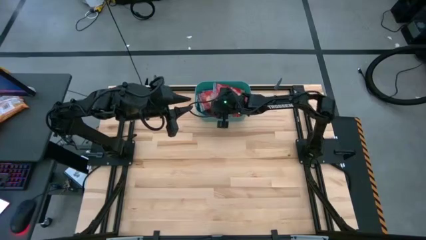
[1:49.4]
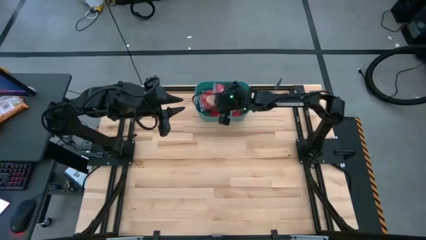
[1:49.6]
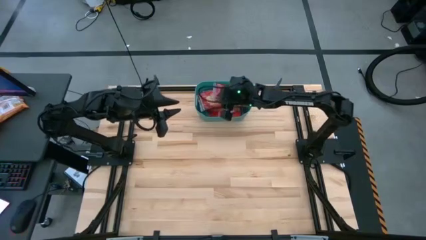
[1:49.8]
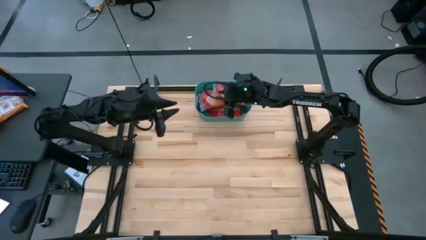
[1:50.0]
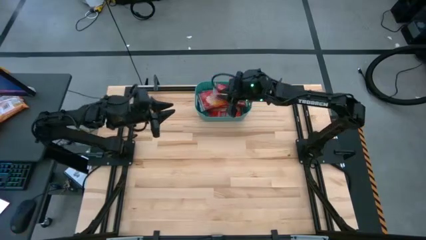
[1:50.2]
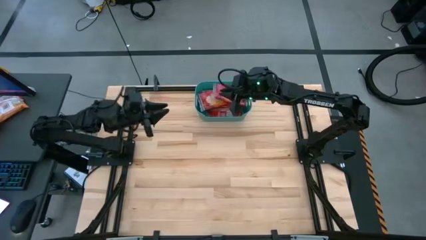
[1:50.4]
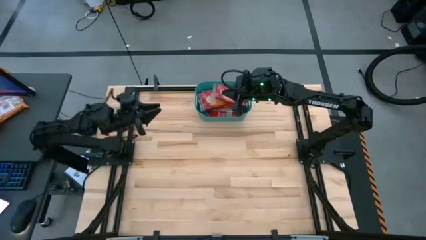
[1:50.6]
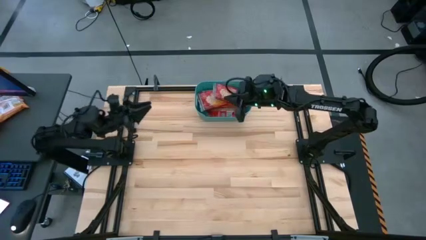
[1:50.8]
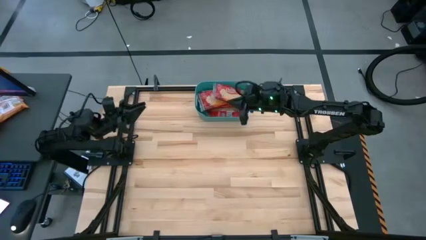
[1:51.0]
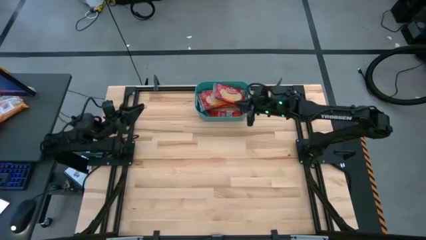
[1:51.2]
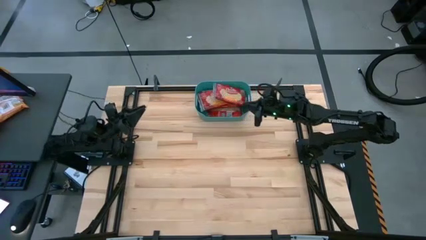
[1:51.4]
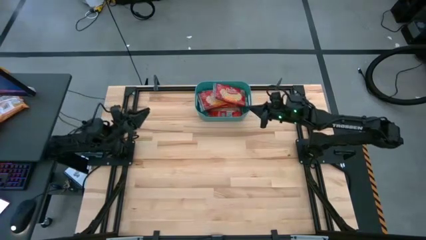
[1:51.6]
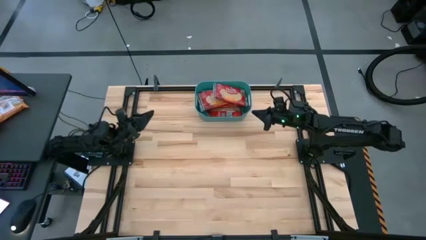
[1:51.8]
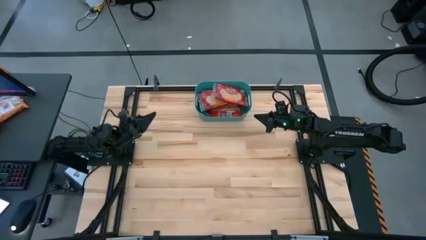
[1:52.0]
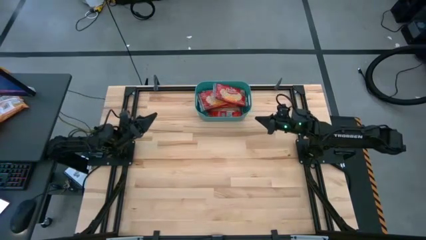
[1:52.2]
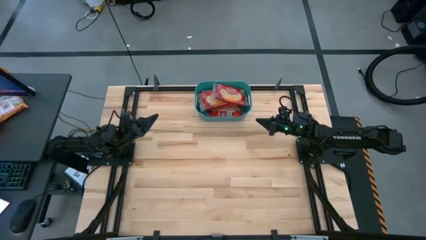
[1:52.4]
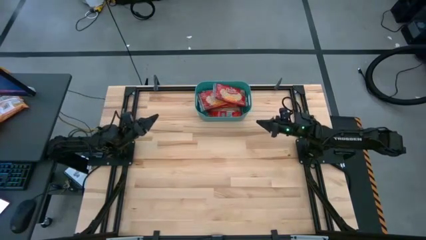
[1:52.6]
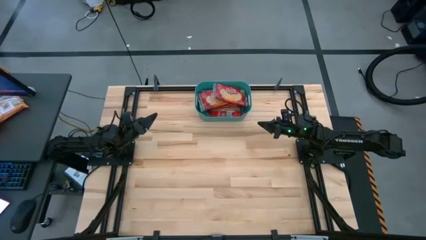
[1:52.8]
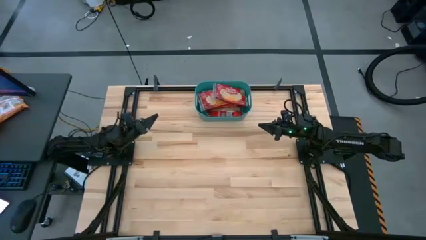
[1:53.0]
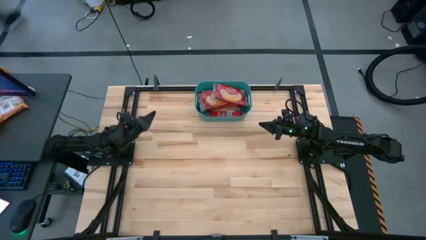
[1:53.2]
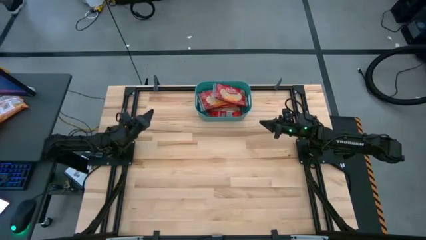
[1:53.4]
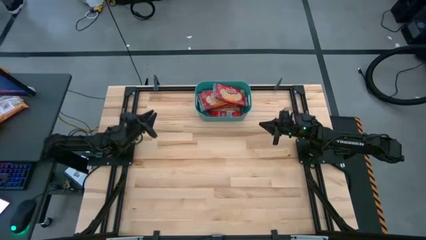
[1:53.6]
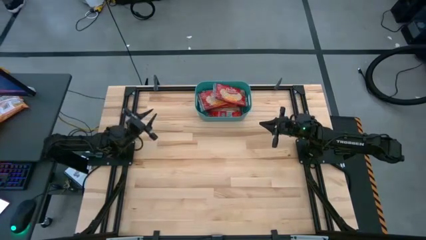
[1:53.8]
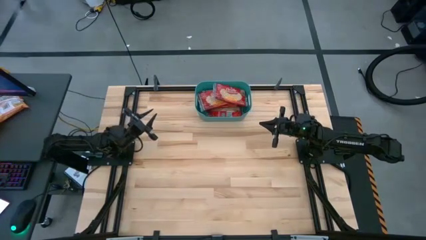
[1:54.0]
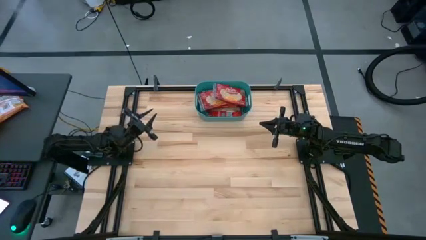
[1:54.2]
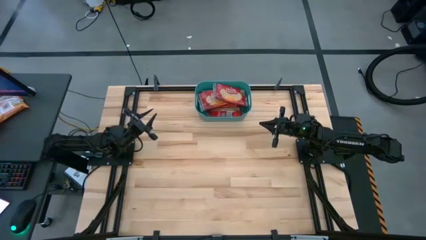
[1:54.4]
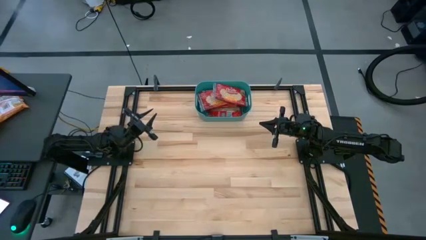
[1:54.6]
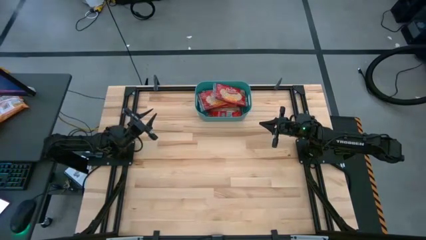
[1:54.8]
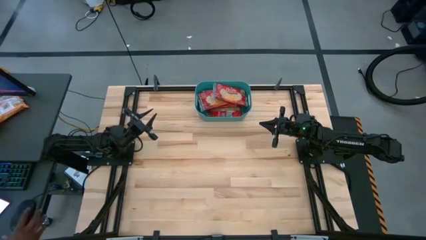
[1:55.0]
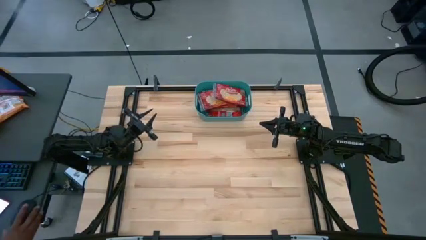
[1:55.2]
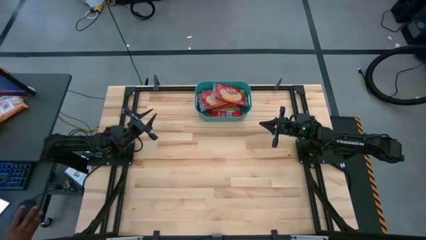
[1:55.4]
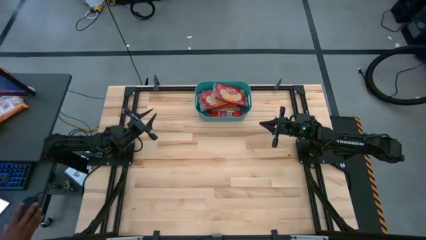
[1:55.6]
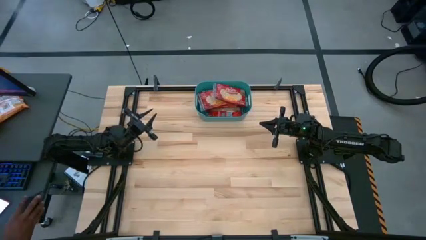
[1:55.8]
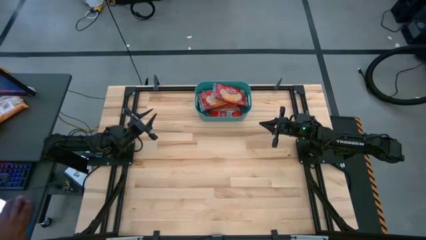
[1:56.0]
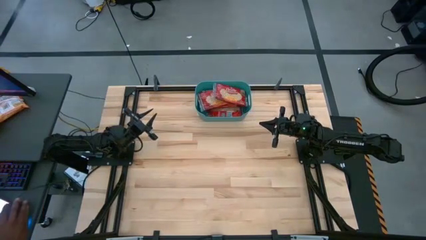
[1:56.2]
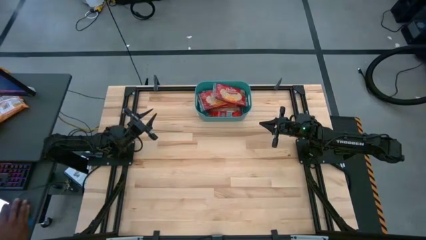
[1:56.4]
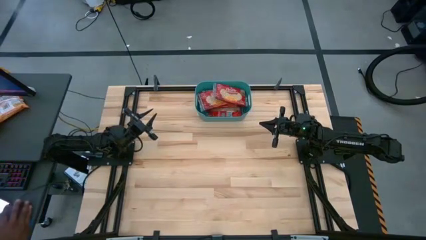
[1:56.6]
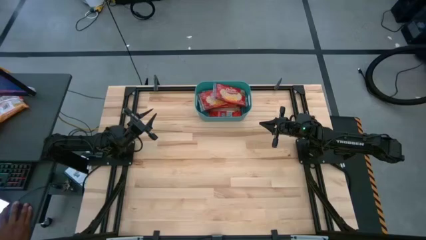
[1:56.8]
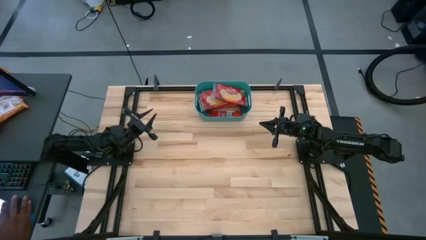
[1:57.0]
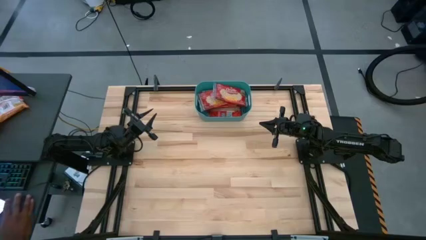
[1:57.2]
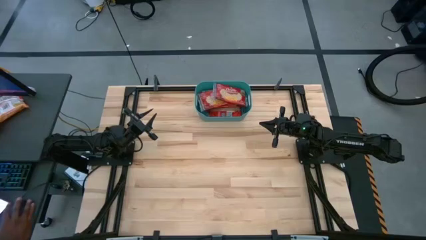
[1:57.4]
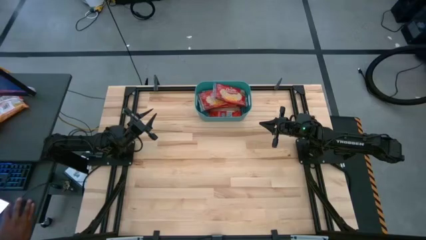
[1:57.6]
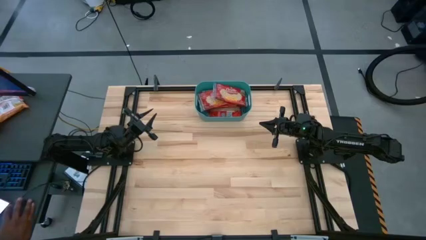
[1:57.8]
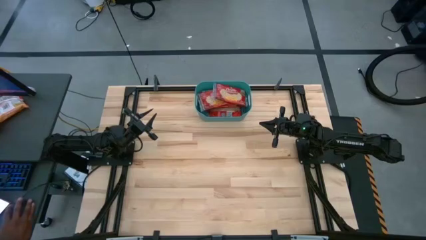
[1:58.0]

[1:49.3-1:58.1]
Task: Sort popcorn bags into baskets
Return to Home Position

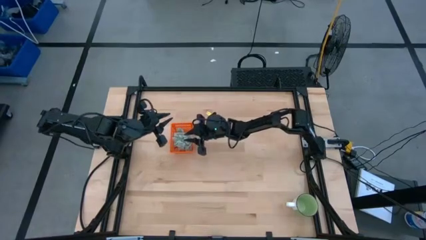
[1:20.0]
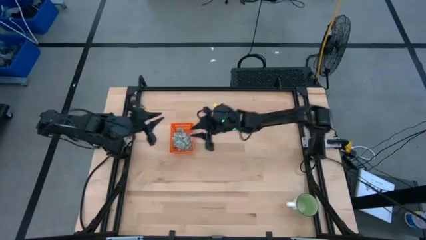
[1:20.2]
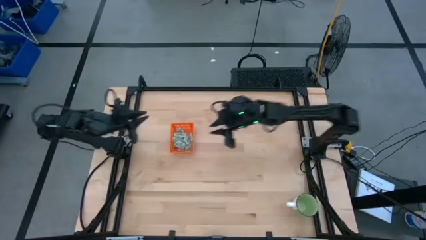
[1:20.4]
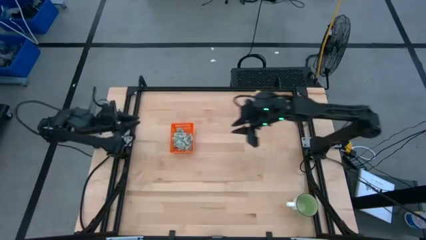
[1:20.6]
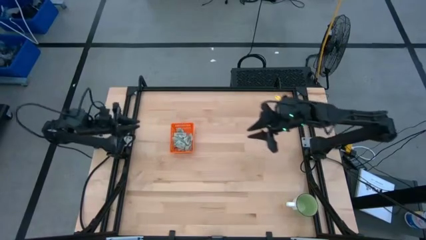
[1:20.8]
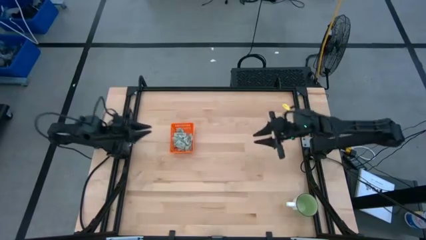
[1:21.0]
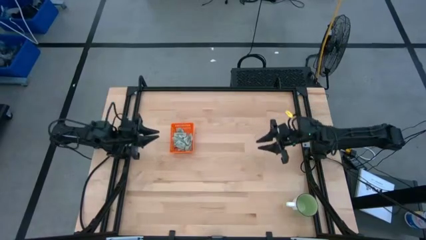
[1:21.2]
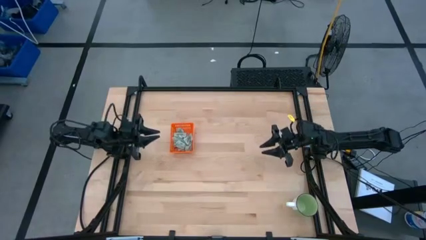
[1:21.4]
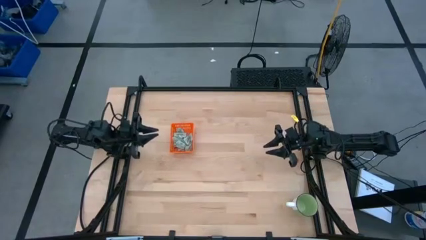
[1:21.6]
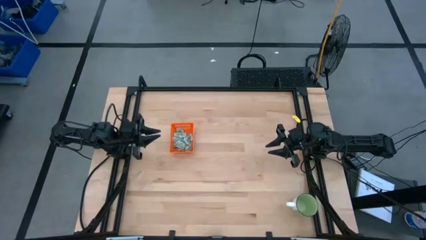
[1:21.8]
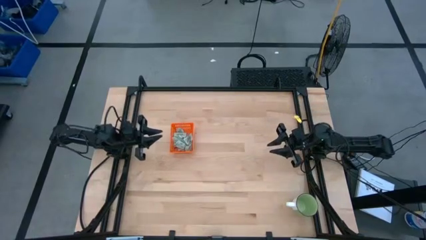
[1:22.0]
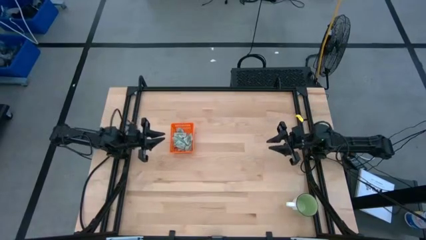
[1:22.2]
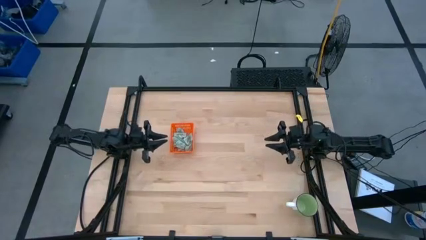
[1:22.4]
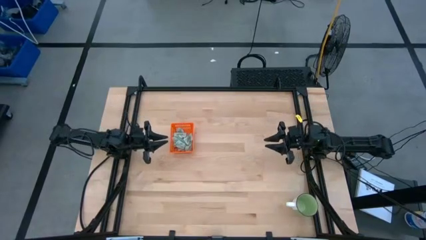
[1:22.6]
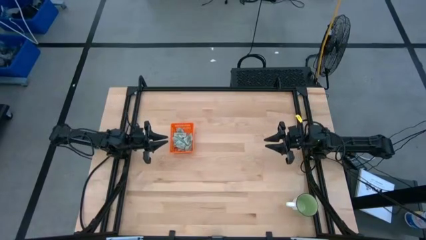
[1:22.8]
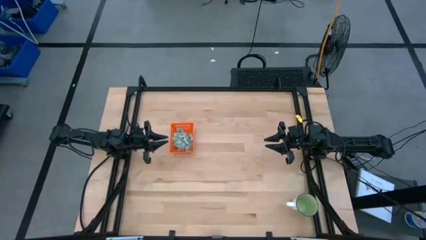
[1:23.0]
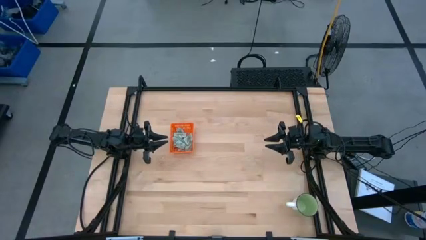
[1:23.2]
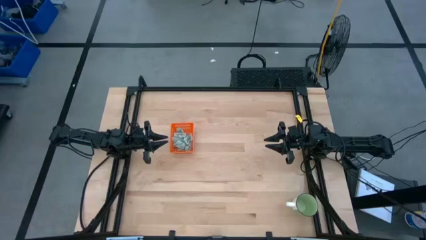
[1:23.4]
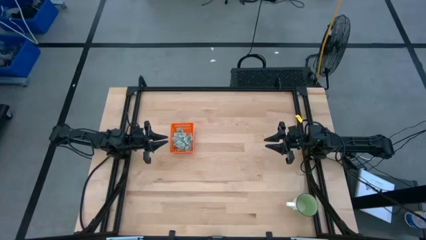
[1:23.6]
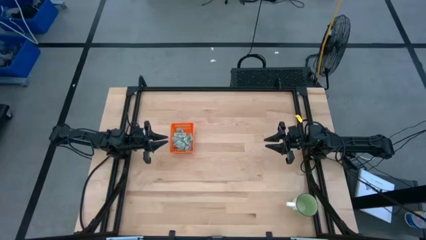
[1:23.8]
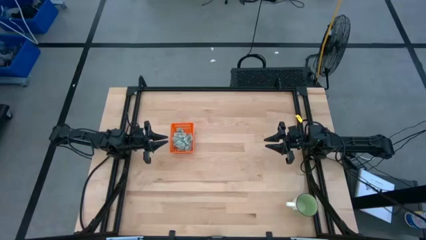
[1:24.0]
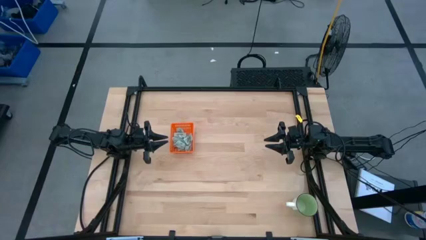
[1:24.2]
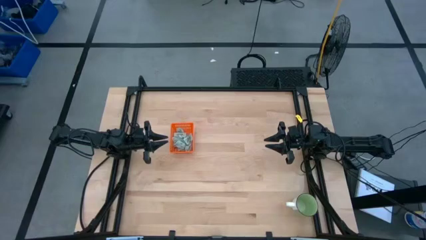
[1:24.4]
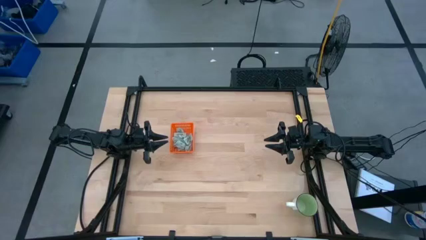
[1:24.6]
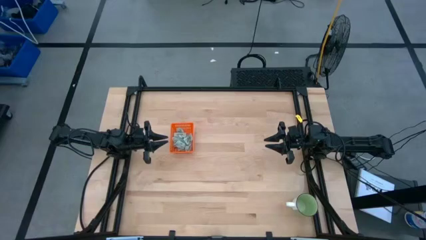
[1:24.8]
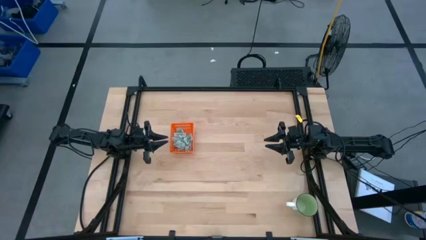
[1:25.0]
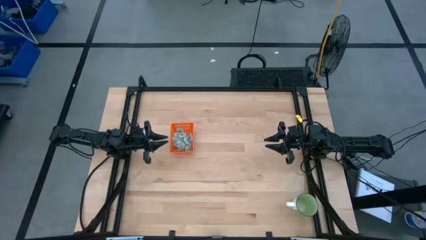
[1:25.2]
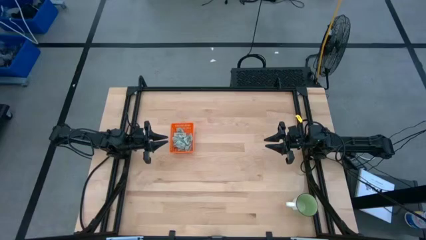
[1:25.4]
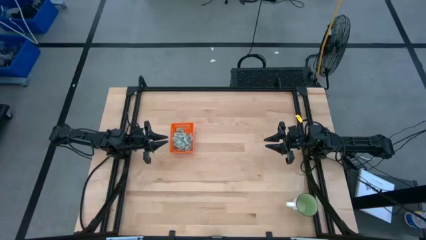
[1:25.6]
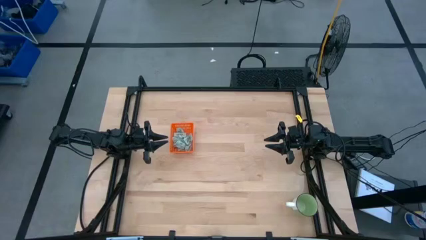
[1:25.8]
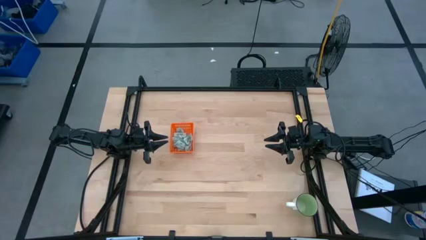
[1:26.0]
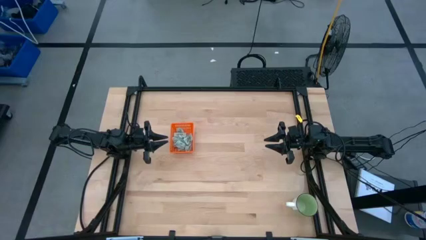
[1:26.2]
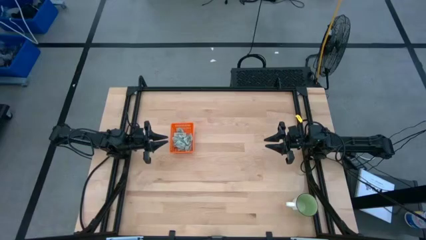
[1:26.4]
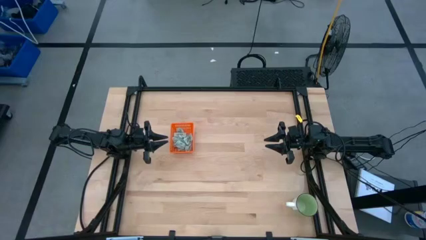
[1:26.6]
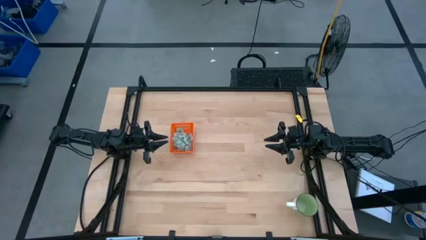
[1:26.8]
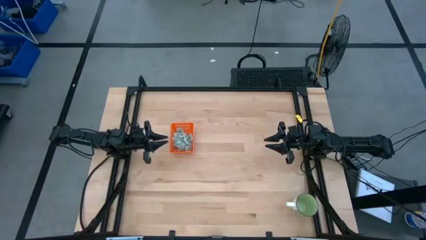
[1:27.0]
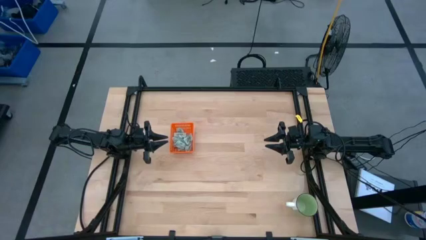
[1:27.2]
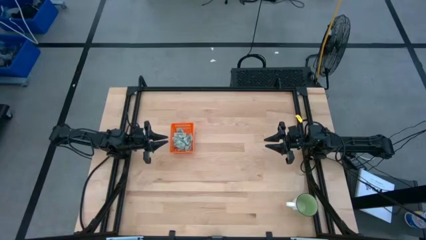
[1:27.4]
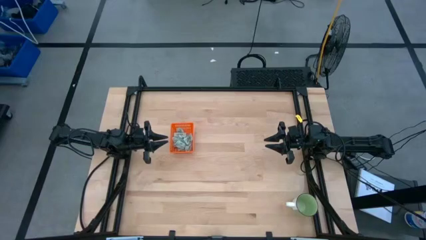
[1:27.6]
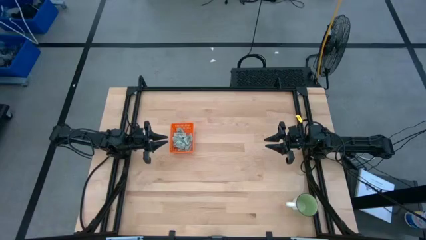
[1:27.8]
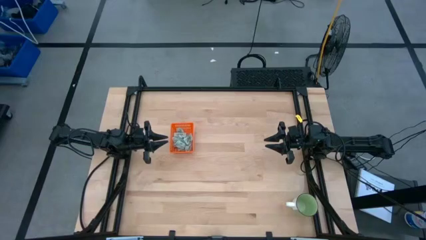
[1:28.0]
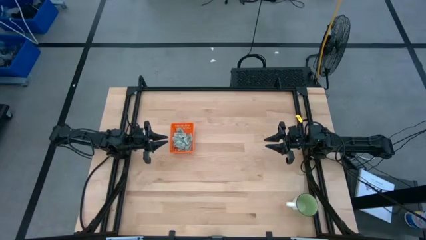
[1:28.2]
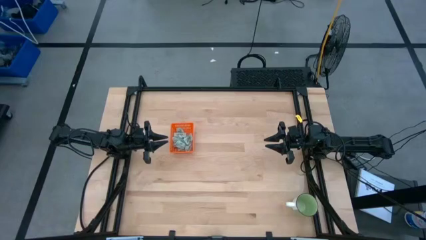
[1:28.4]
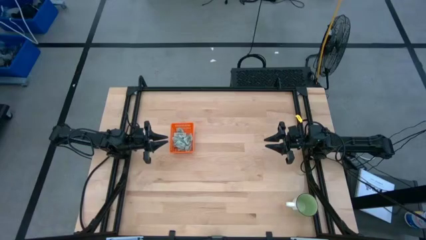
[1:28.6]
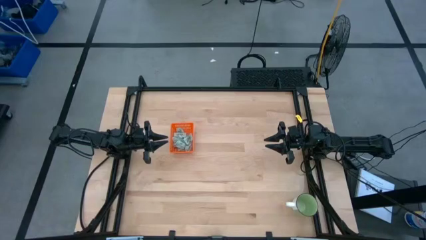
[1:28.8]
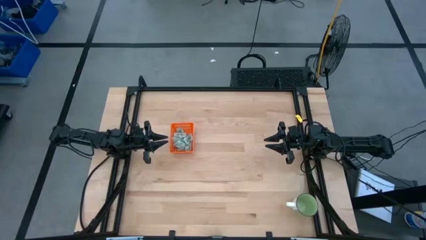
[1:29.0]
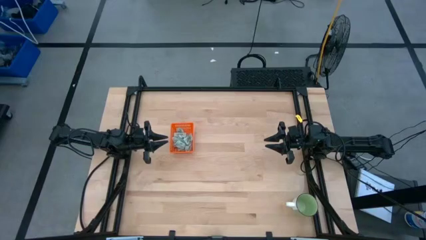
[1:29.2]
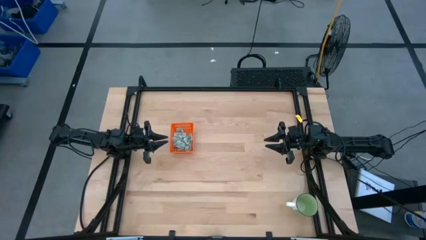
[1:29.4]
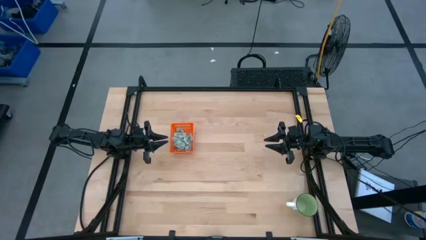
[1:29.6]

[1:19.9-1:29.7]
Task: Pick and place Stevia / Truvia into bins
Return to Home Position
